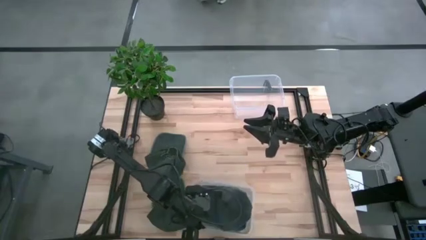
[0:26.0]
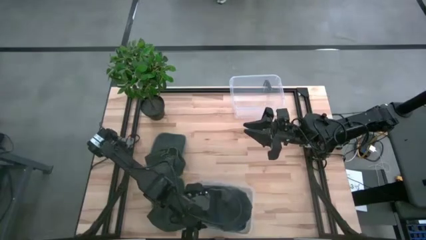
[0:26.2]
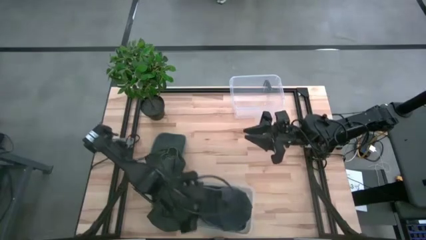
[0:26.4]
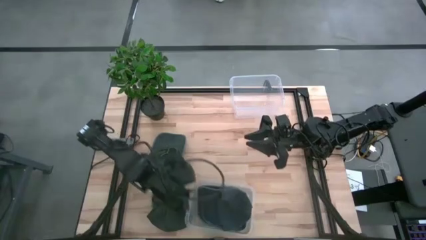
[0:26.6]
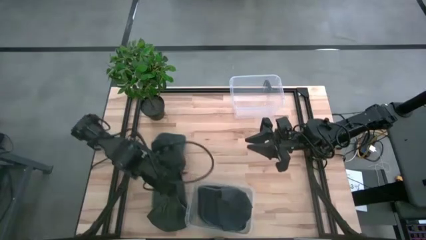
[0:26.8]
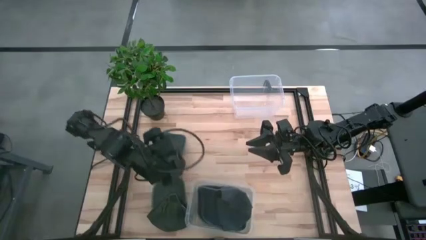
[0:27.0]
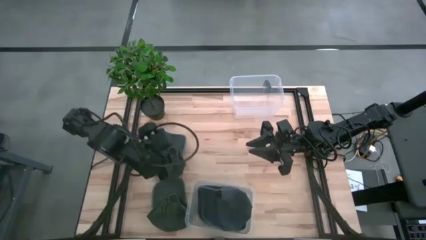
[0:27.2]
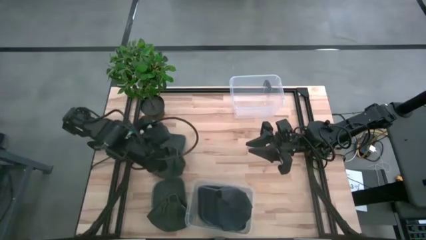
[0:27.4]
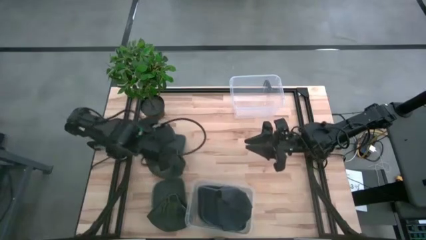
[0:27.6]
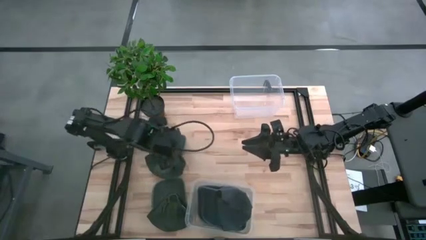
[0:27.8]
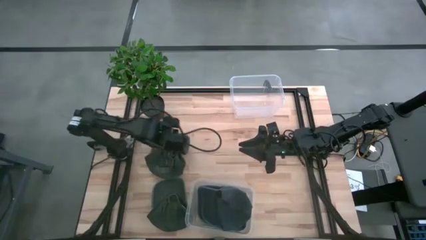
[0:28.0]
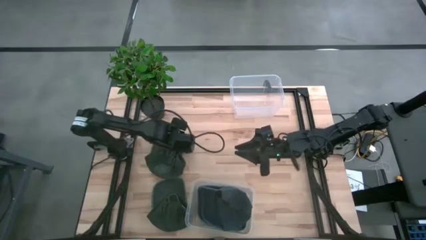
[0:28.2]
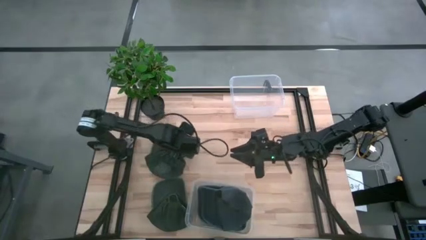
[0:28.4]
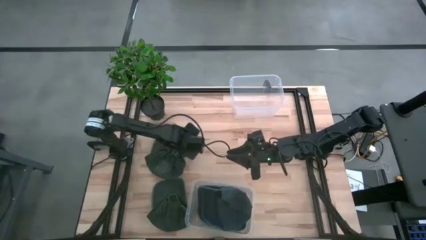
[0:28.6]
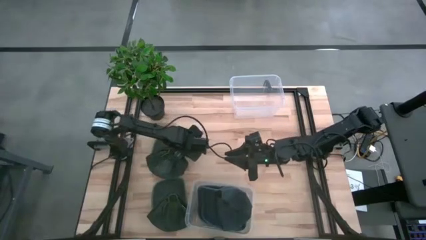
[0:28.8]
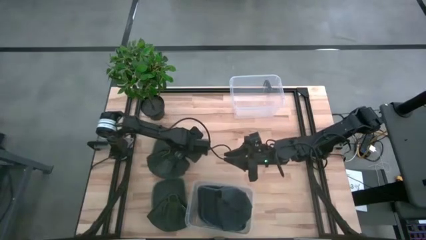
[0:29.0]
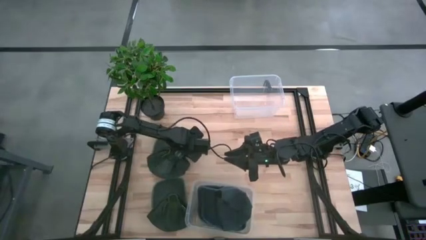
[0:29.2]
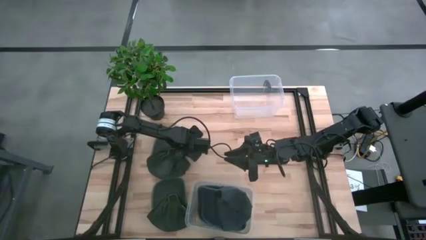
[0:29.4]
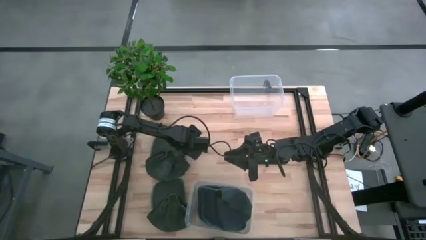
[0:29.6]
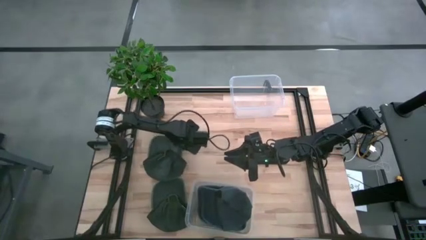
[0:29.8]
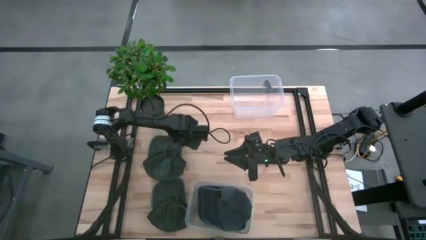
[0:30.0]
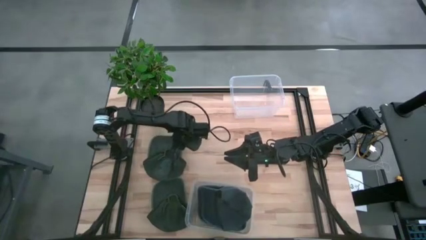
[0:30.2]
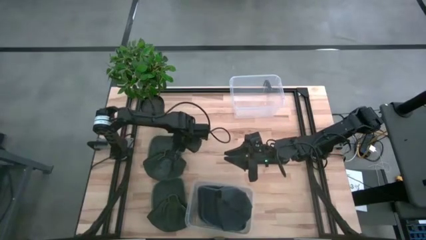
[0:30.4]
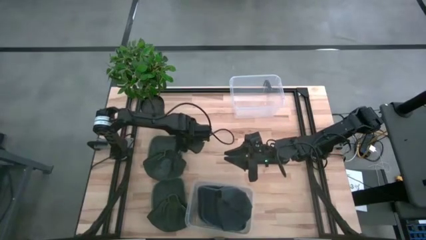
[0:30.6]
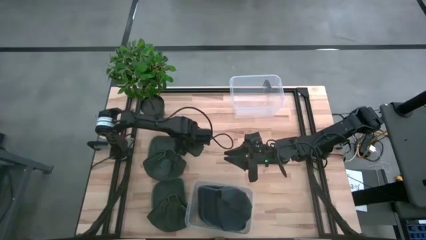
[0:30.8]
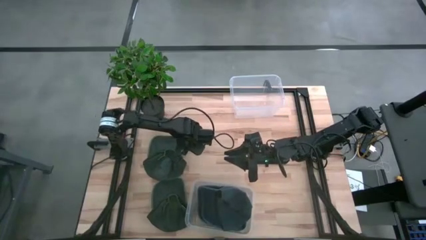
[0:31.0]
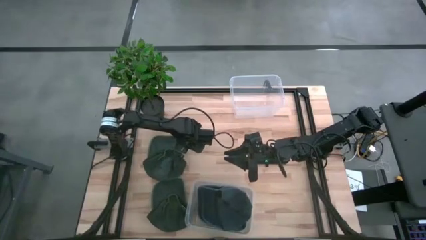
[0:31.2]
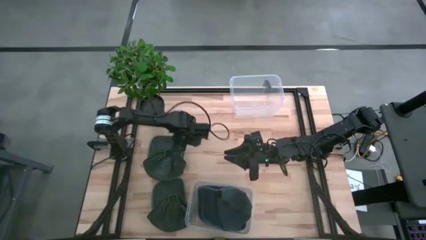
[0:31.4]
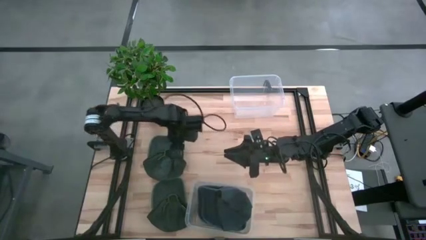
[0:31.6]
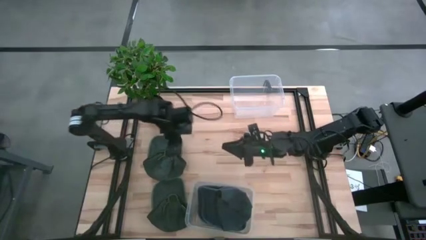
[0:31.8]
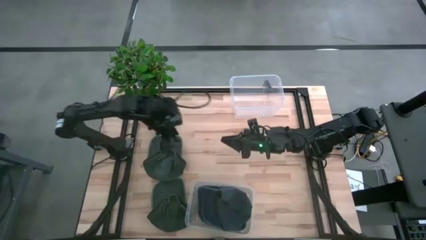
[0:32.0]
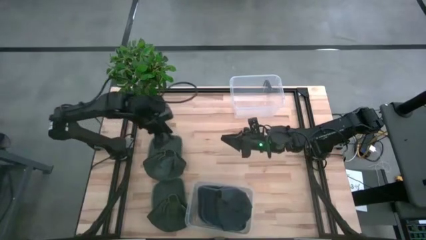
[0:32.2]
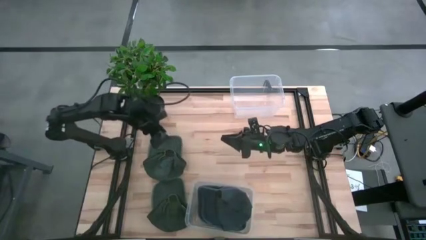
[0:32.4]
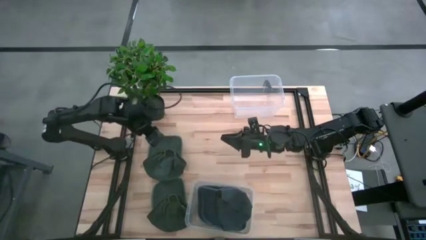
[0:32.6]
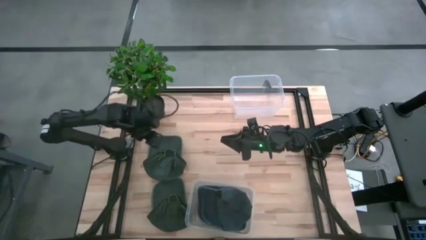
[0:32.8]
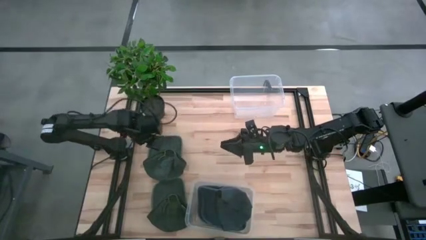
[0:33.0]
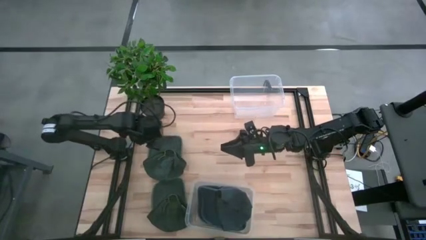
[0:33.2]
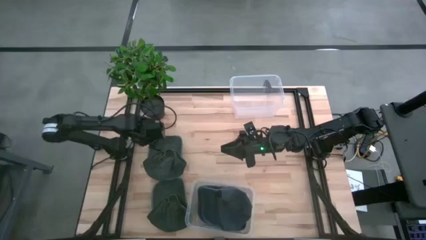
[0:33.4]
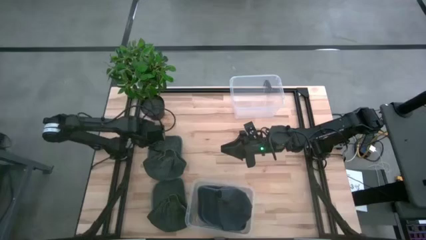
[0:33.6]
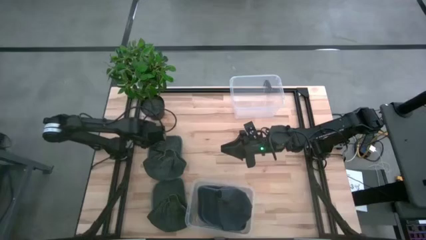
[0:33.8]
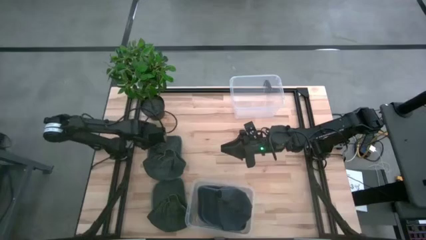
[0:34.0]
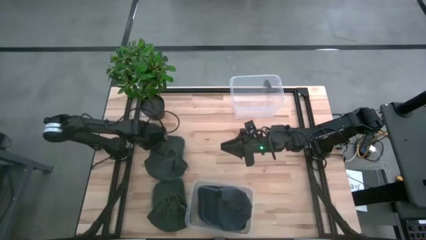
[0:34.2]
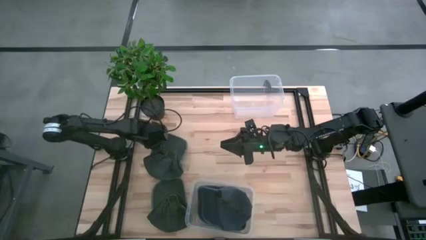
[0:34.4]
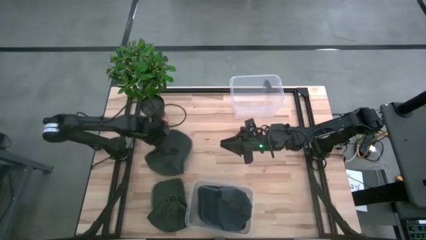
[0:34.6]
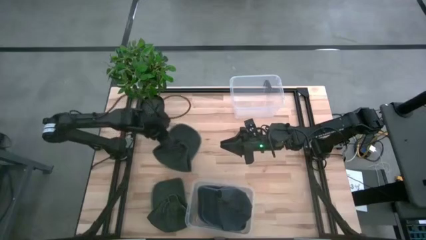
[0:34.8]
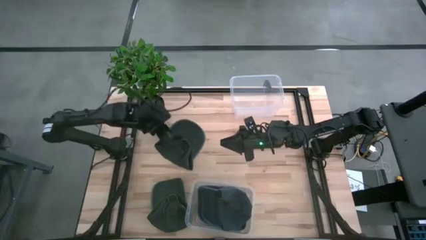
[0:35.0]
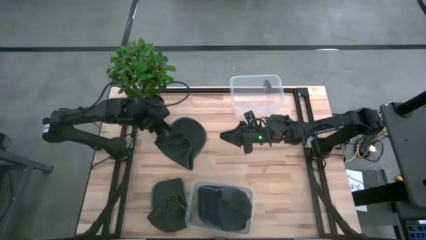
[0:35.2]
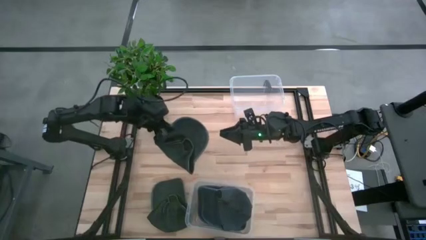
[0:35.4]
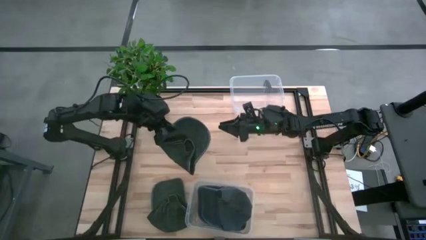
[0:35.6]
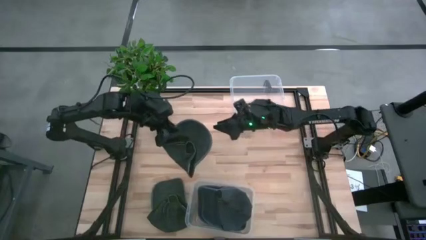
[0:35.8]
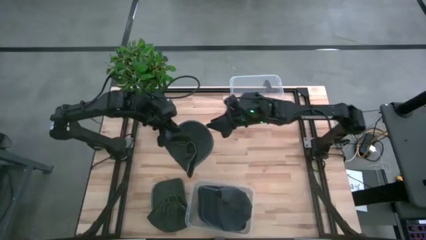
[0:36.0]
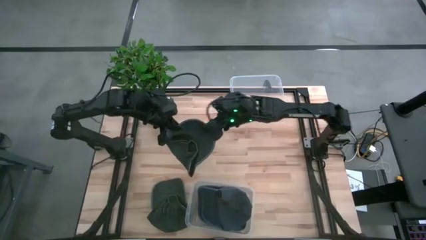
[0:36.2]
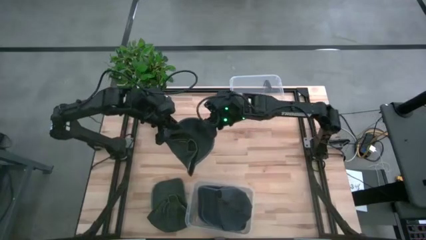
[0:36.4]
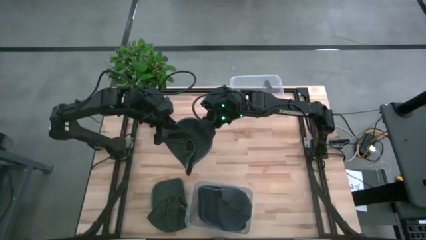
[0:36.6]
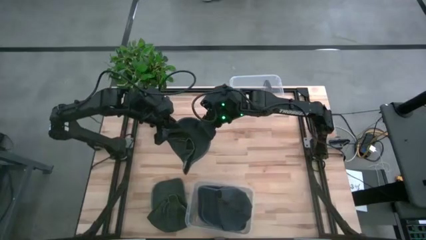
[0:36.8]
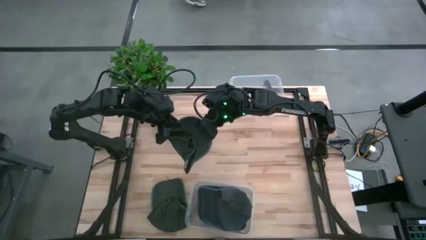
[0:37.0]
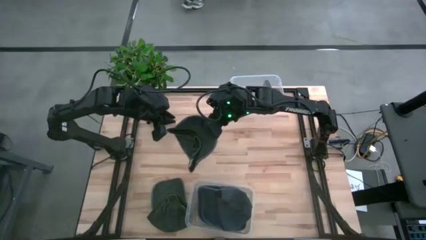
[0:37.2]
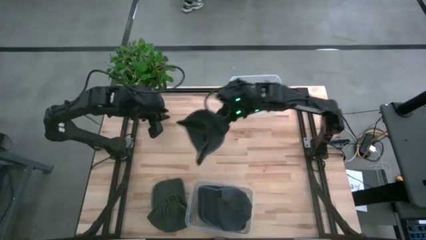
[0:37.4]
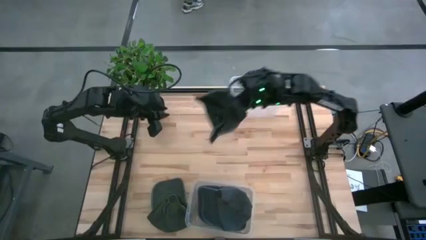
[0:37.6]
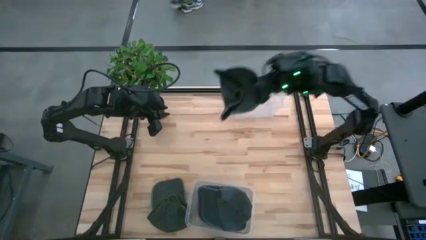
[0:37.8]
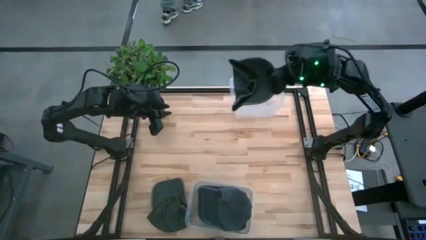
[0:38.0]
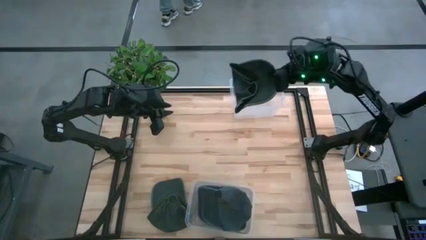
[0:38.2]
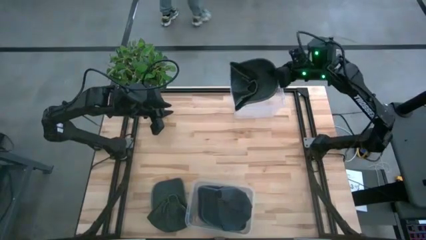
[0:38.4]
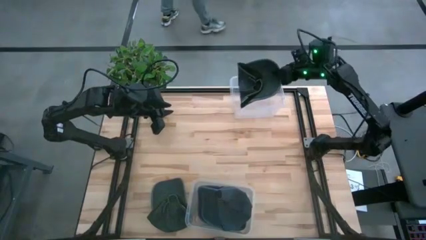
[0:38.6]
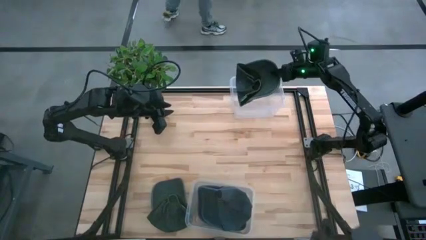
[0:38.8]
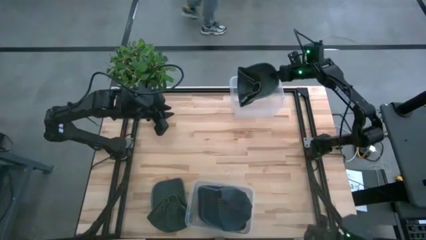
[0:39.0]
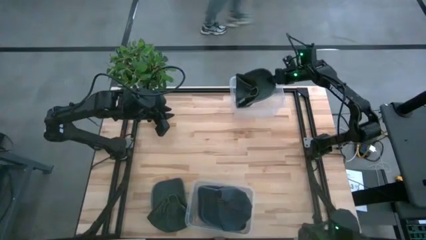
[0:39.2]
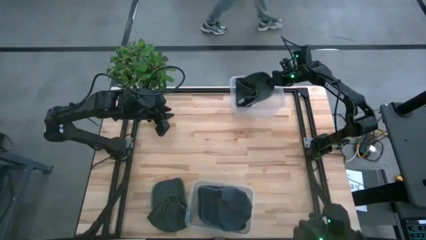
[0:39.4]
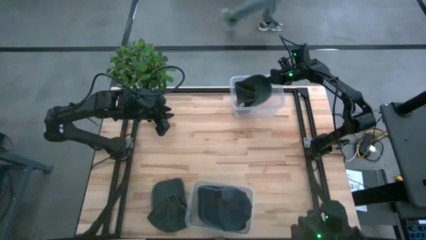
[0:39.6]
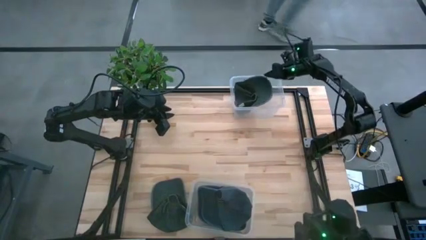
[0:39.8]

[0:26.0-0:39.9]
Task: Pick & Place hat
Put the top black cap into the top transparent bin
